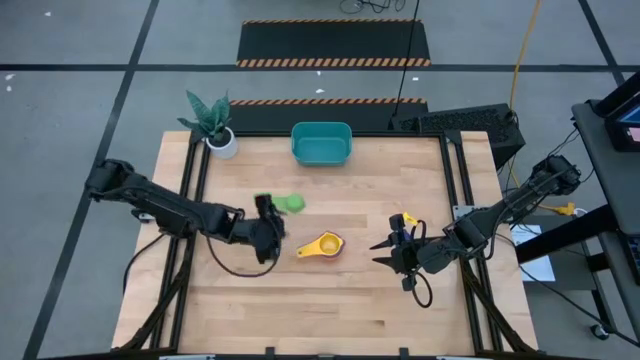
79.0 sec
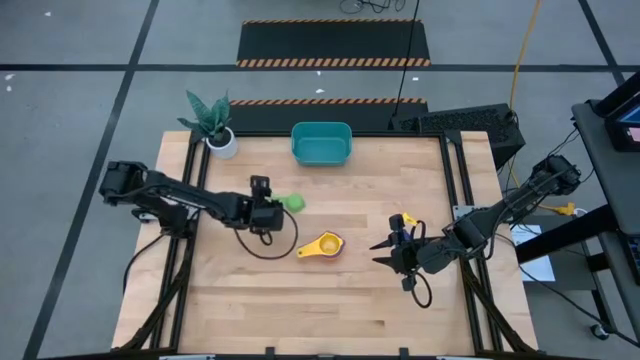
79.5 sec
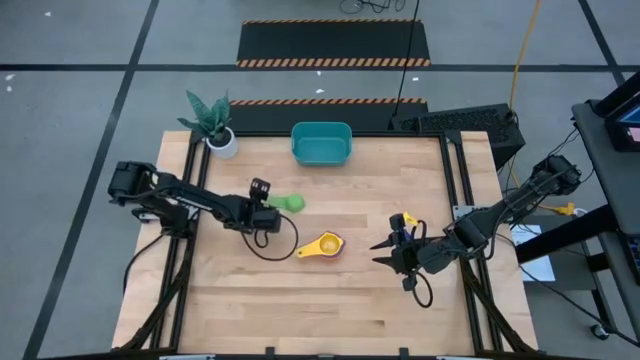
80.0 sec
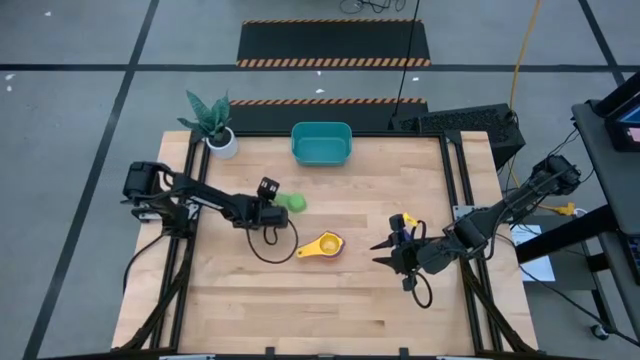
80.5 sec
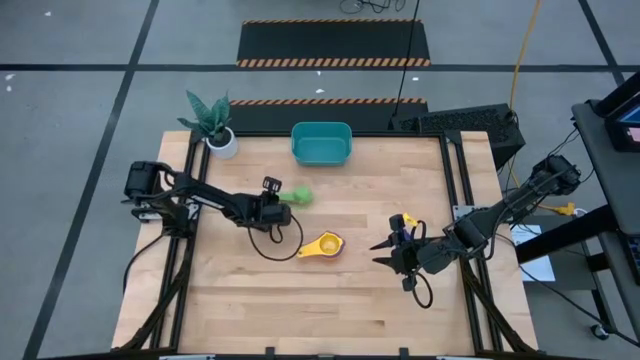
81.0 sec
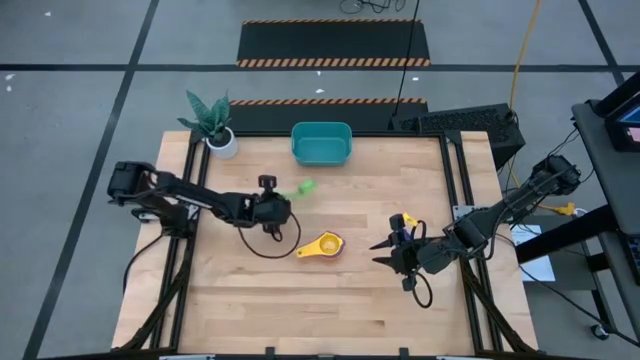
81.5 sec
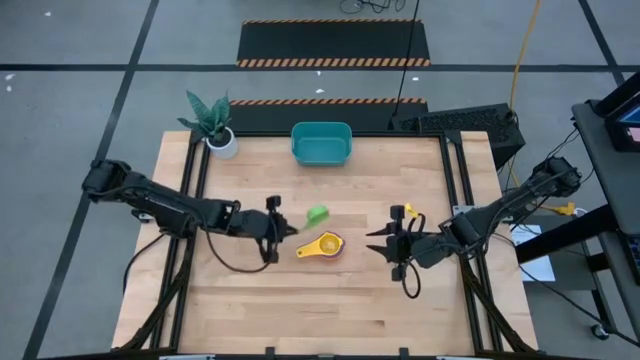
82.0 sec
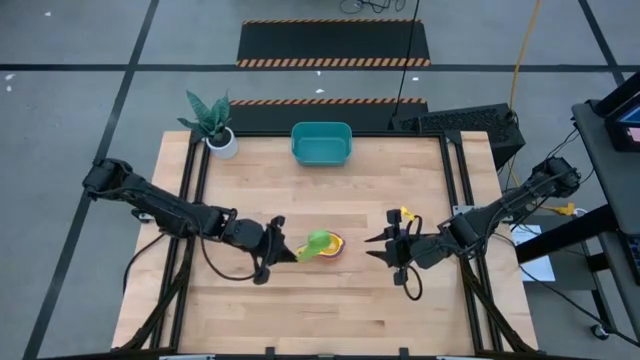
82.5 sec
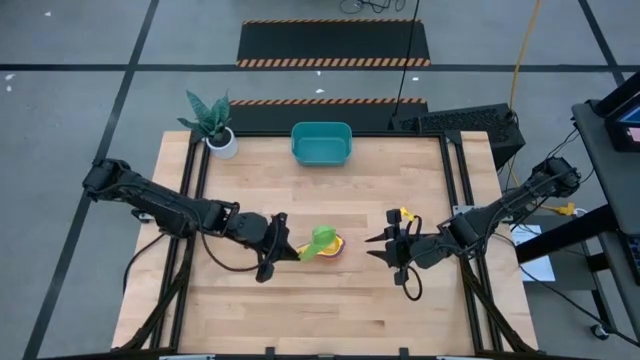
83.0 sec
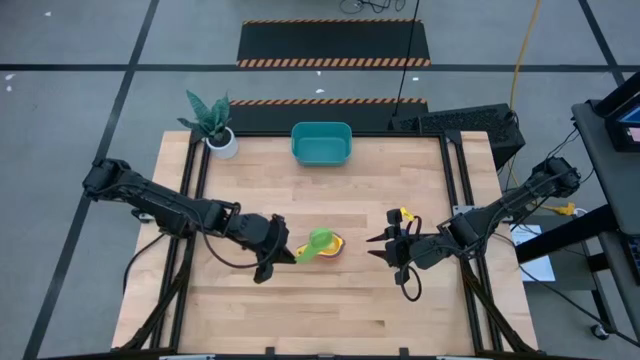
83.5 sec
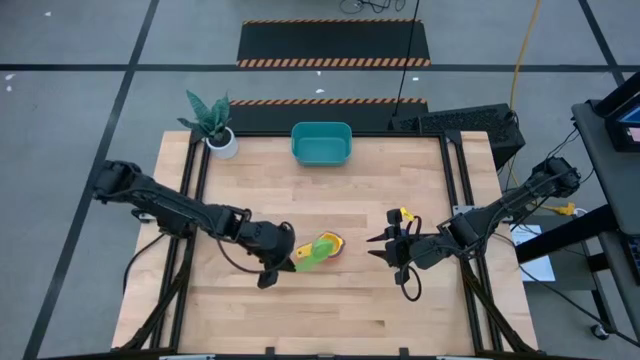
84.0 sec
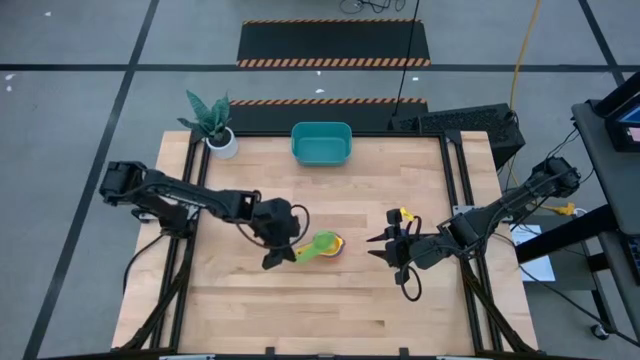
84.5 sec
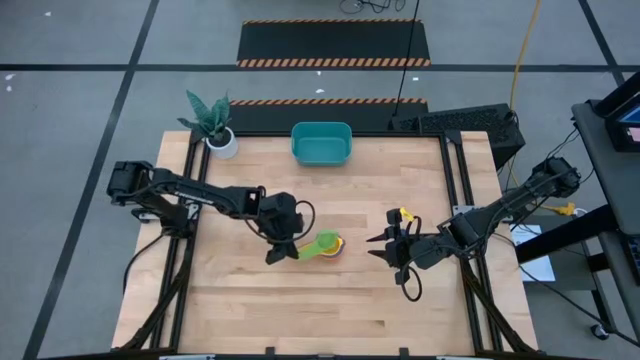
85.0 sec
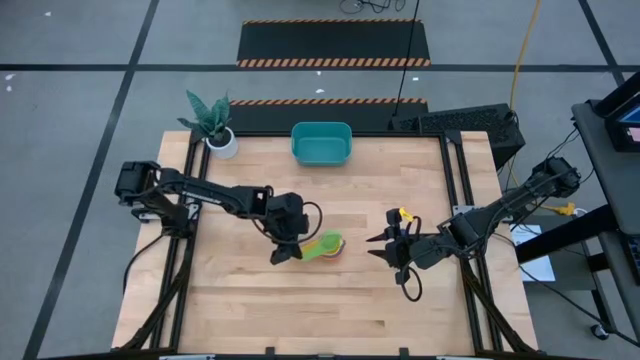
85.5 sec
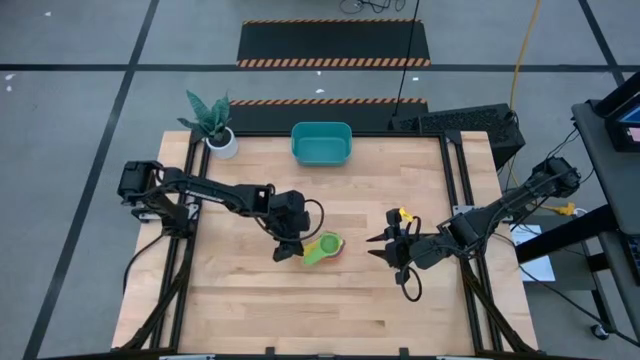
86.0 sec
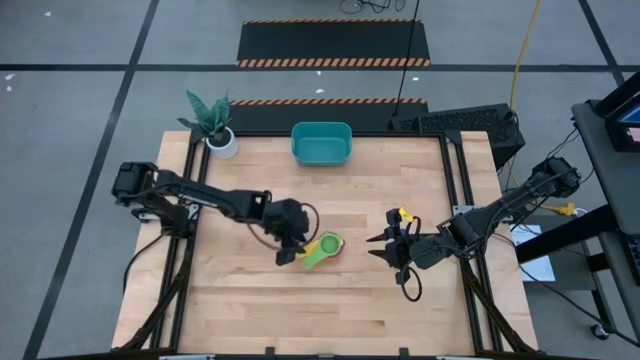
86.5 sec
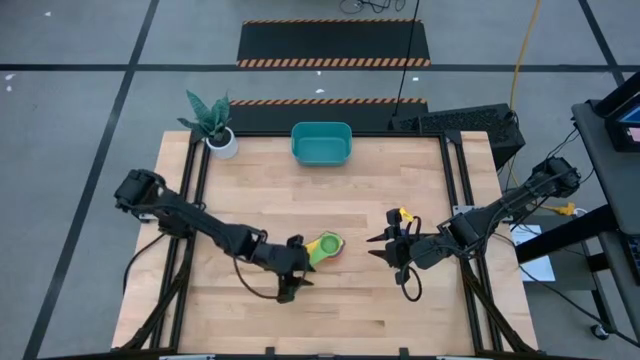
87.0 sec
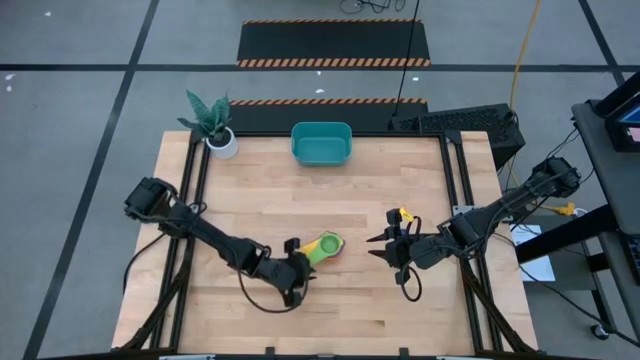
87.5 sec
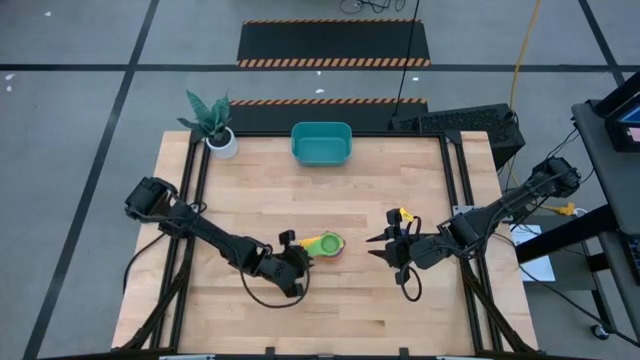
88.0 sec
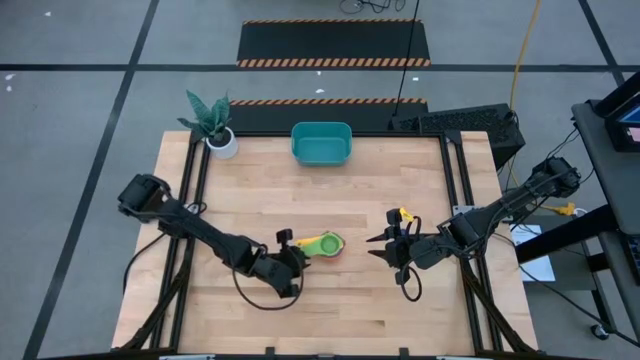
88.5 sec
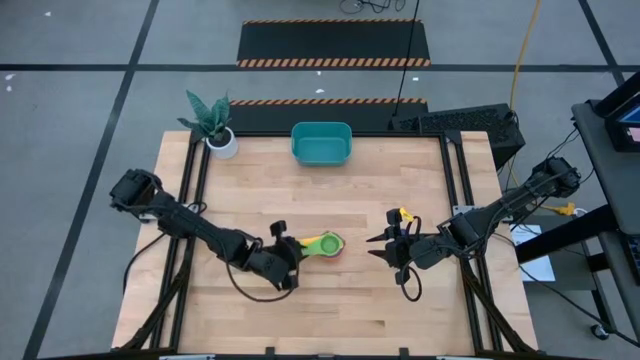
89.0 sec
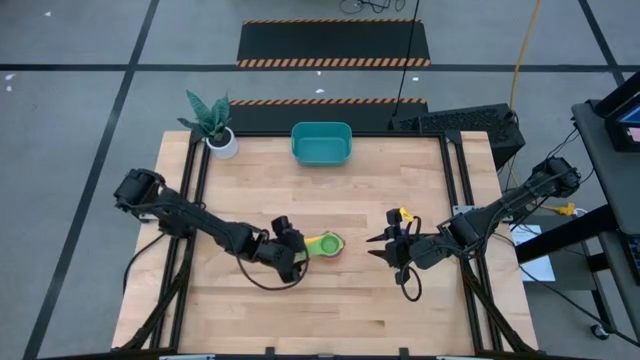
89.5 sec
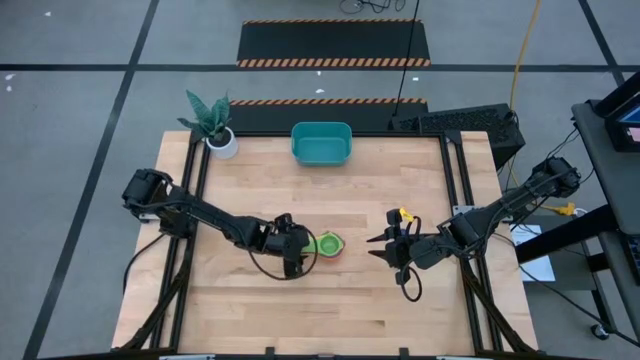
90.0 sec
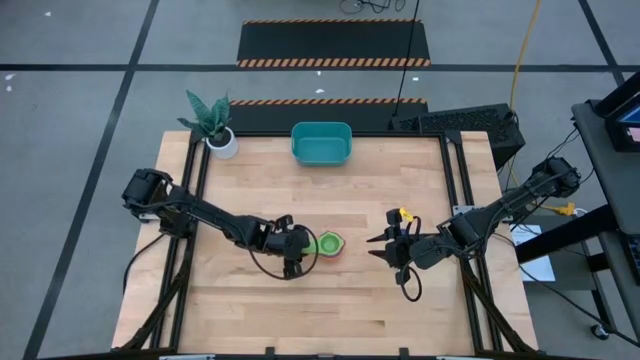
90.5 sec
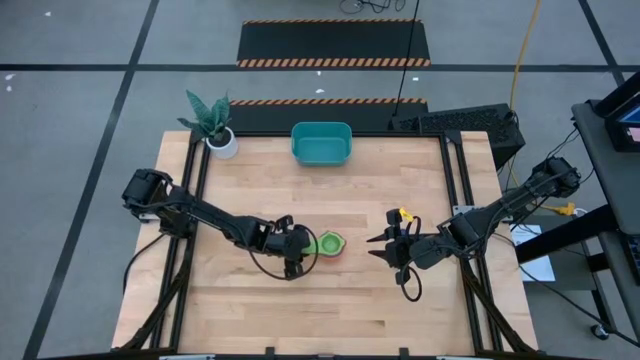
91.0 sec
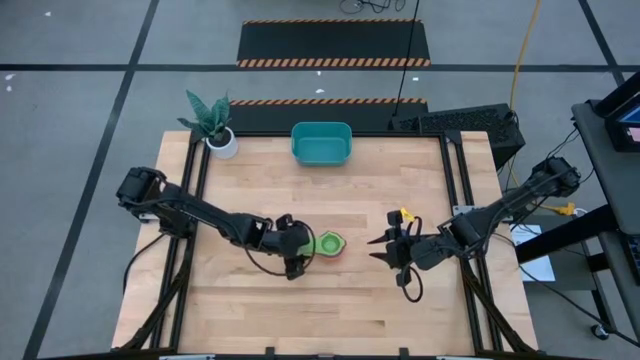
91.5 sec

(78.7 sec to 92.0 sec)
Task: Nest measuring cups in basket
Stack the green measuring cup on top of the yellow measuring cup

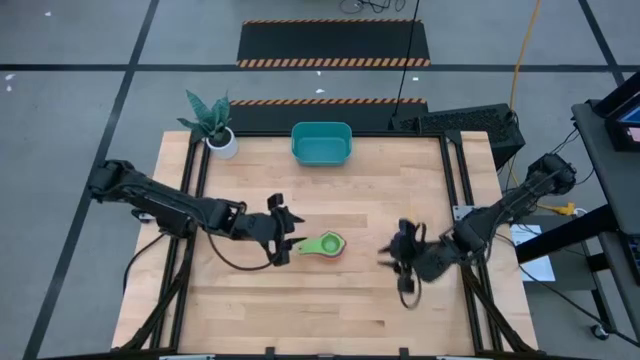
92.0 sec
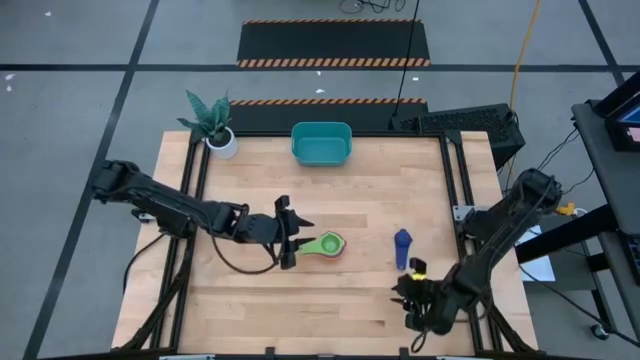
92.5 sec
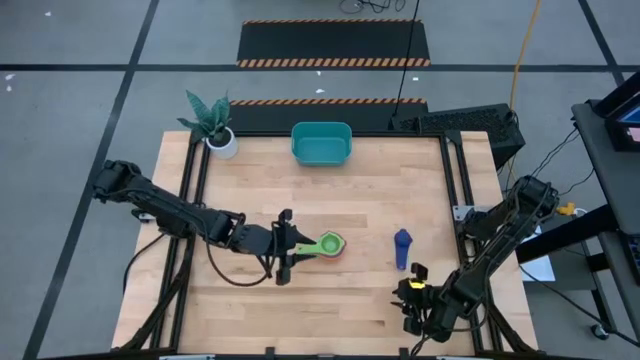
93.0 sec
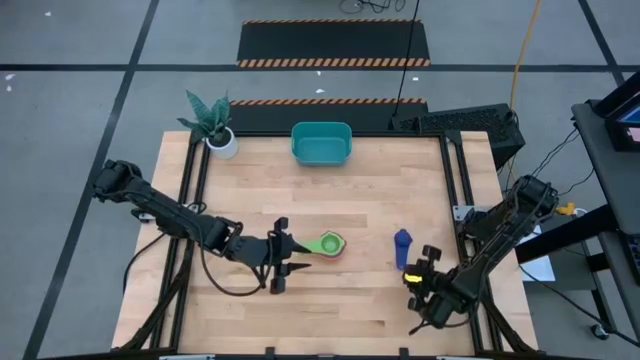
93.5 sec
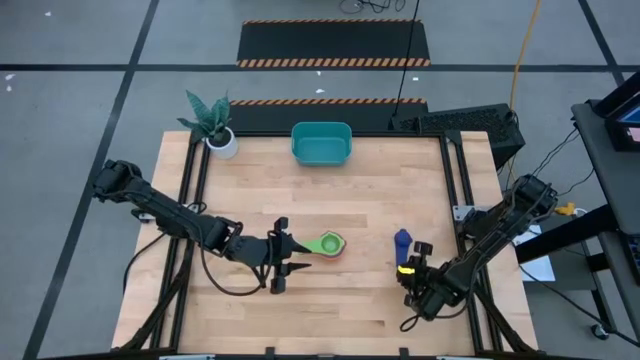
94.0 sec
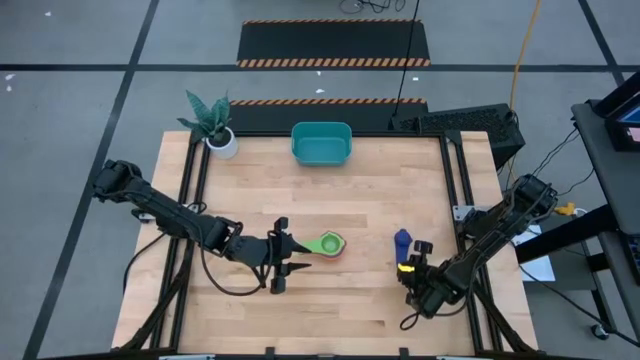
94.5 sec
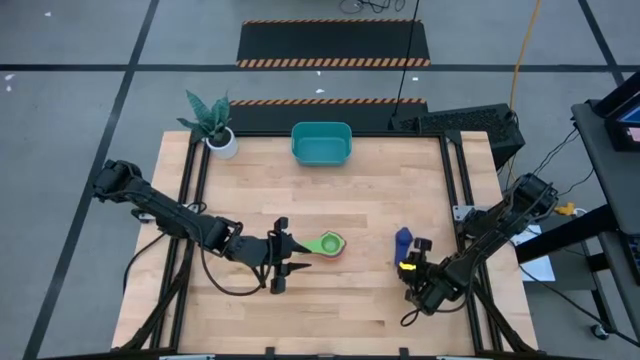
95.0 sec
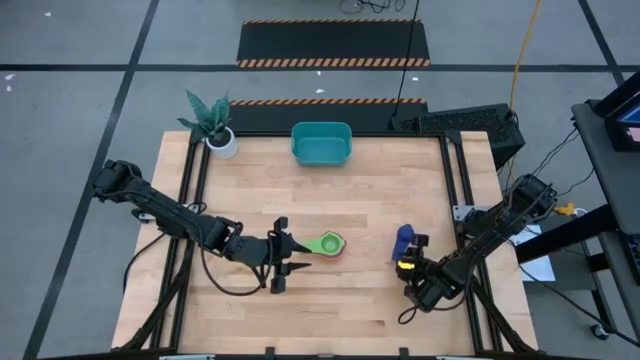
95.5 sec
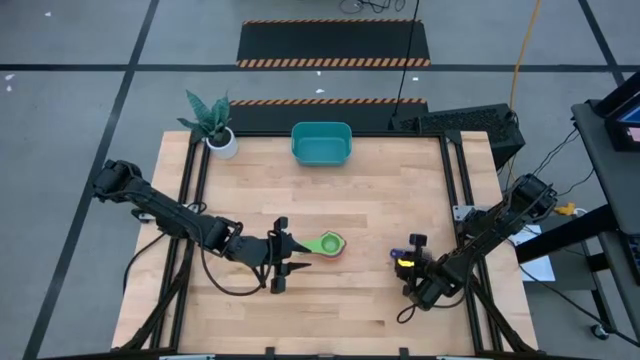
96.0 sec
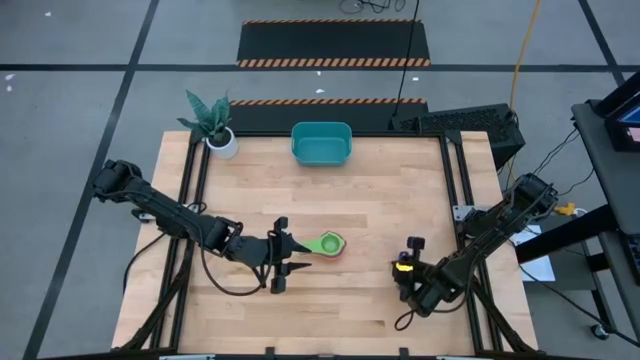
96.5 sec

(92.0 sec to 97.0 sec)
Stack the dark blue measuring cup on top of the green measuring cup

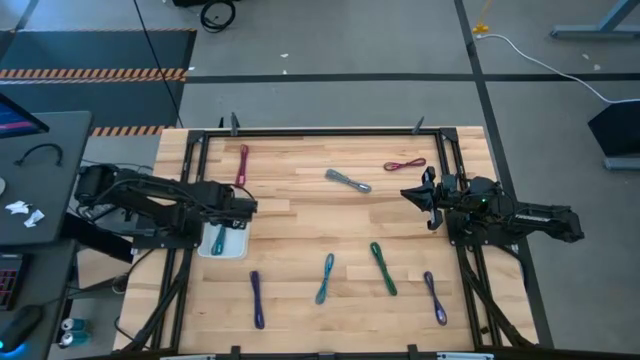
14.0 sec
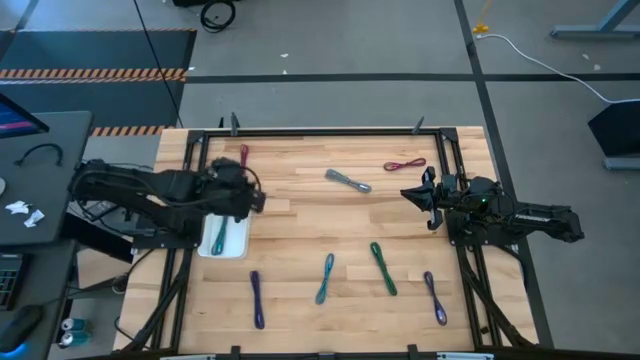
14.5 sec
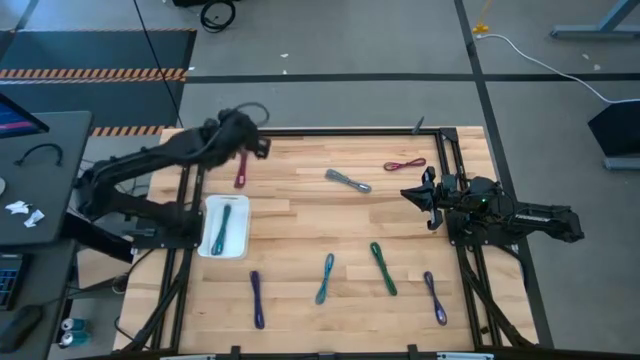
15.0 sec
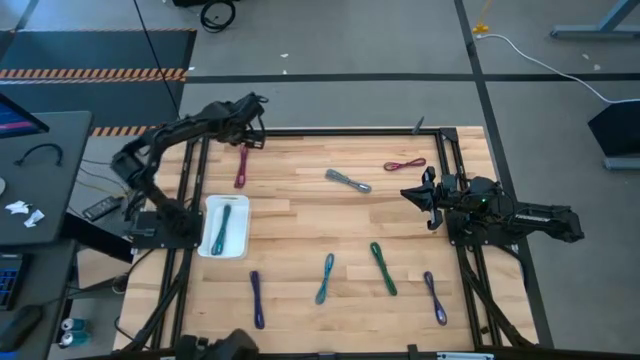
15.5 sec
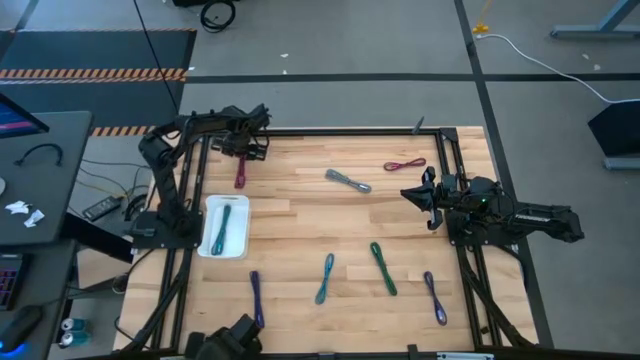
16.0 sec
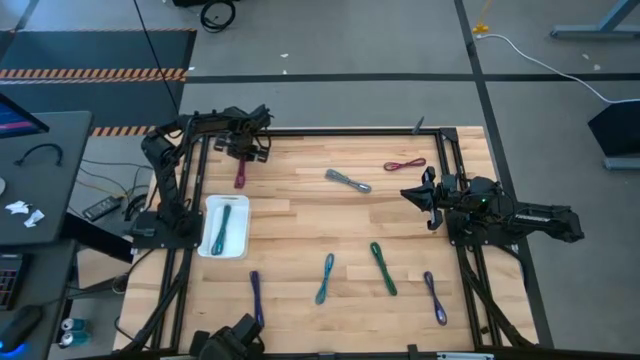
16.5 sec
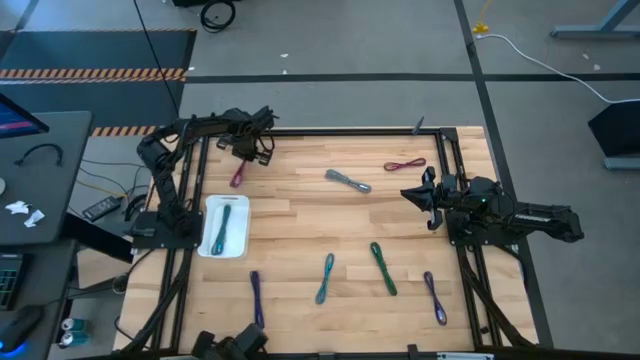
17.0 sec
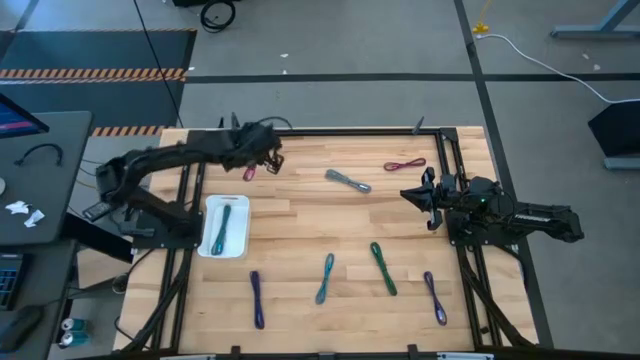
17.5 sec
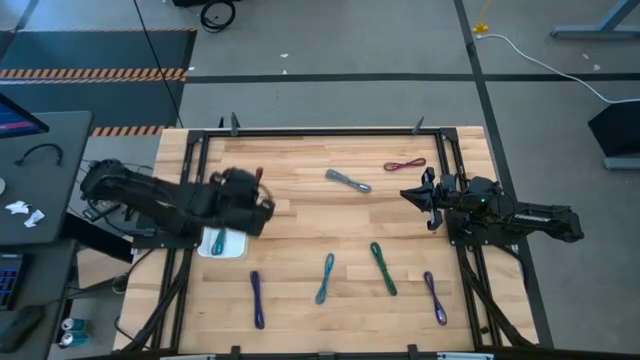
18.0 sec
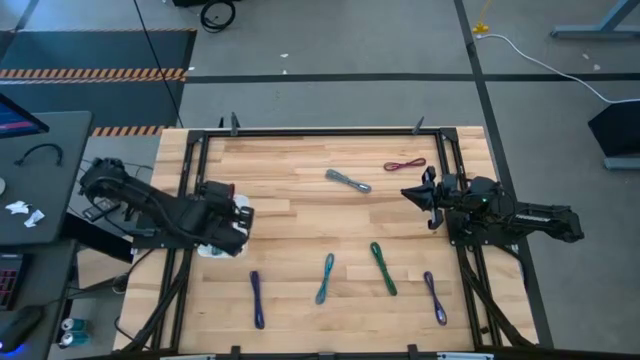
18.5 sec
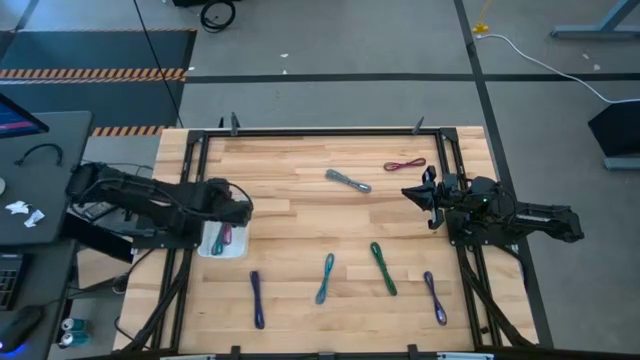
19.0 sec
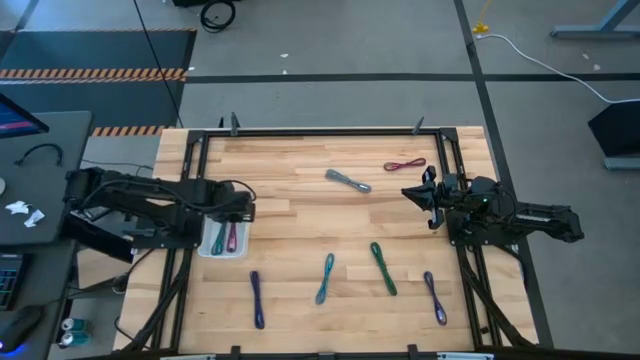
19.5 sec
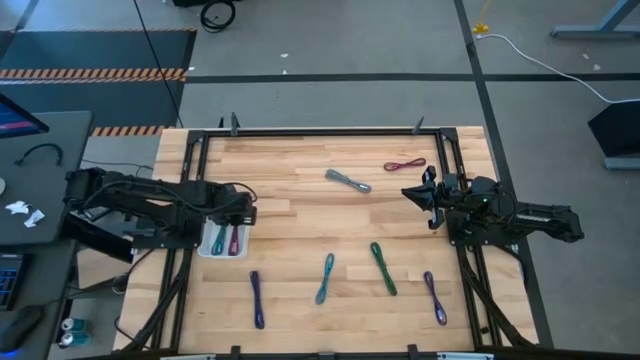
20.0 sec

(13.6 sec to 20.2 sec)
Task: Pick and place USB-C Cables
Put the left pink charger cable into the white bin
